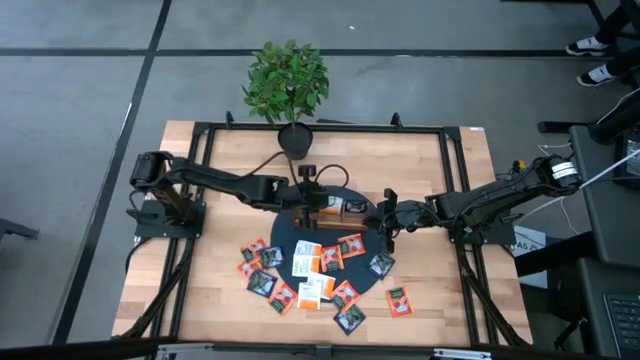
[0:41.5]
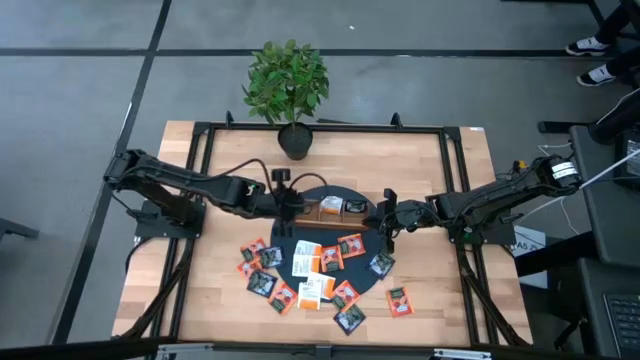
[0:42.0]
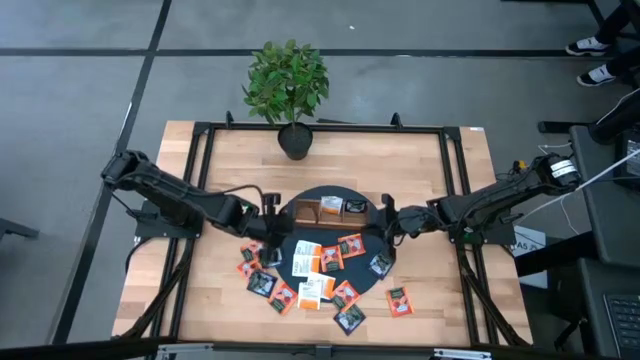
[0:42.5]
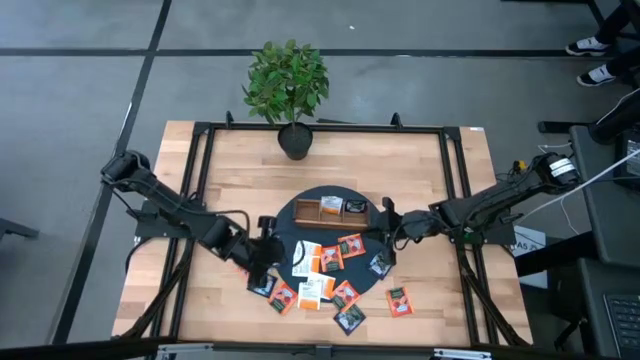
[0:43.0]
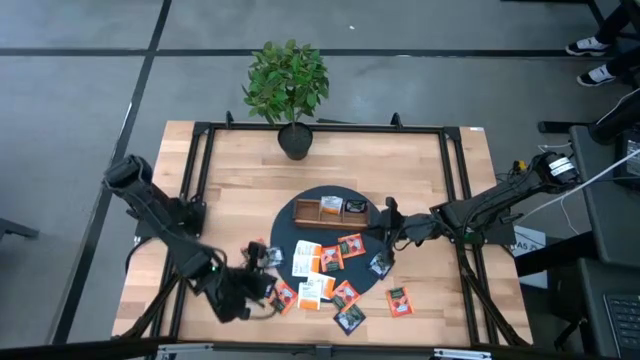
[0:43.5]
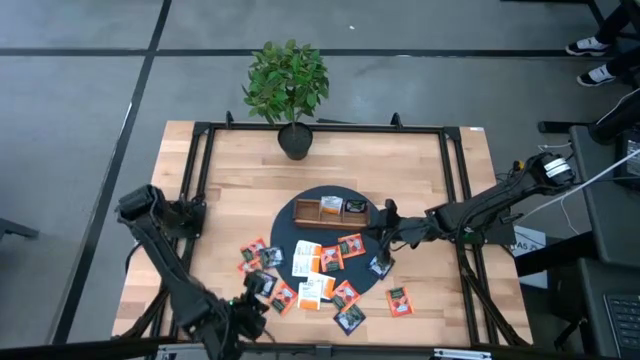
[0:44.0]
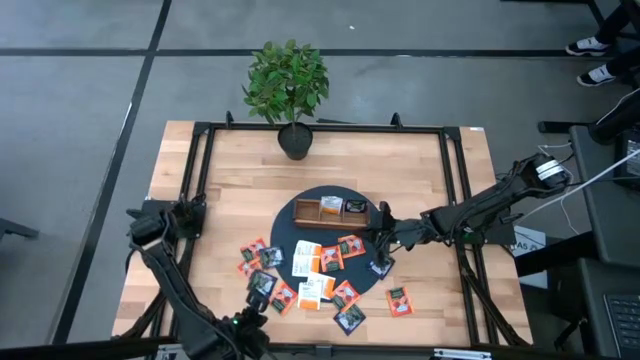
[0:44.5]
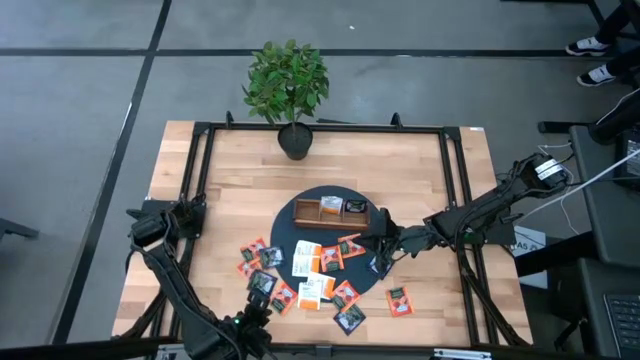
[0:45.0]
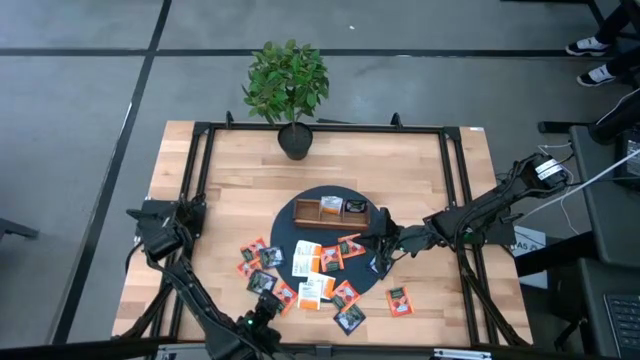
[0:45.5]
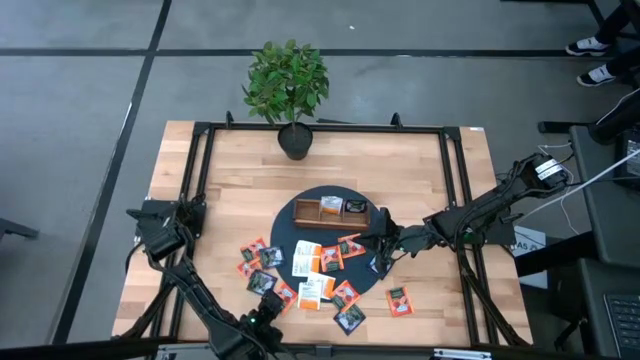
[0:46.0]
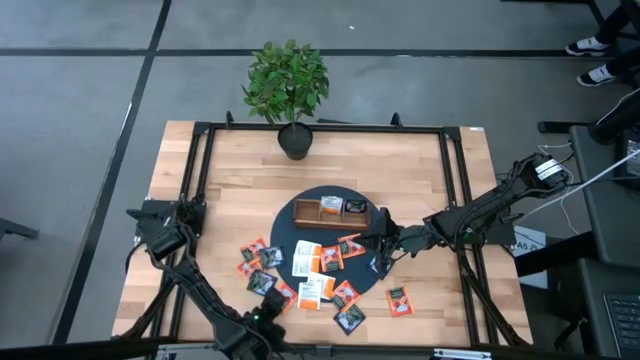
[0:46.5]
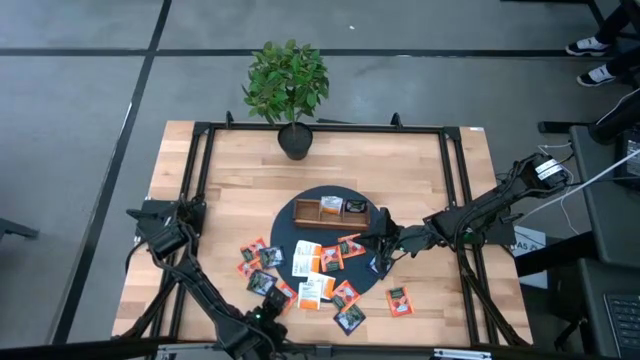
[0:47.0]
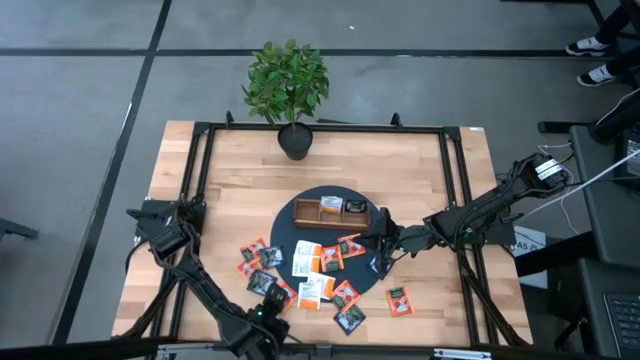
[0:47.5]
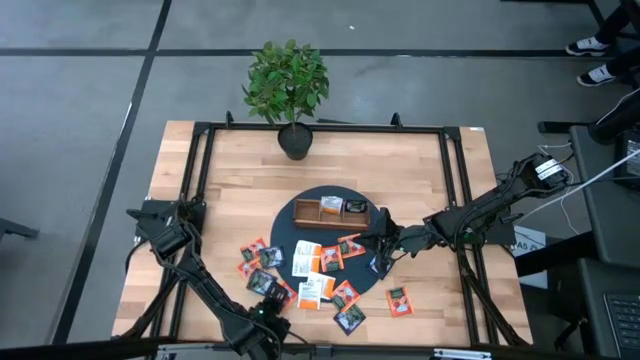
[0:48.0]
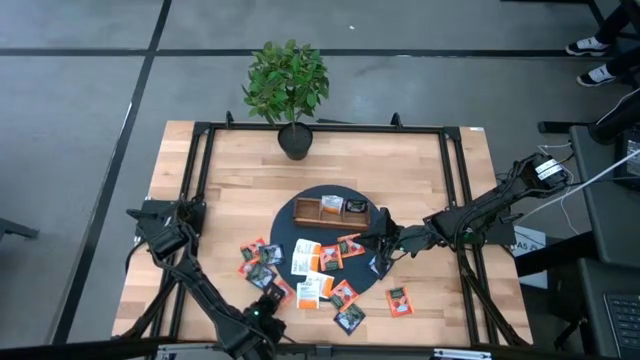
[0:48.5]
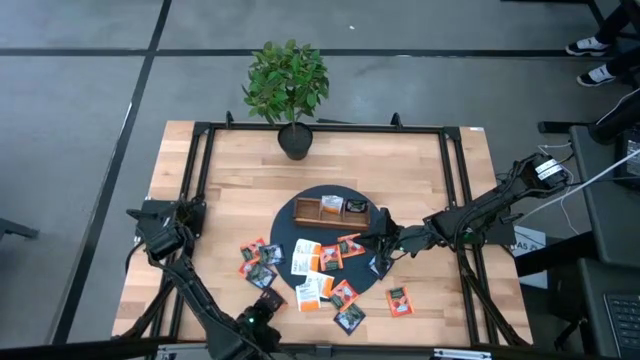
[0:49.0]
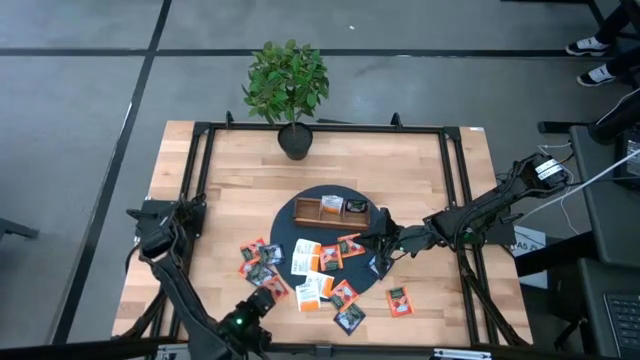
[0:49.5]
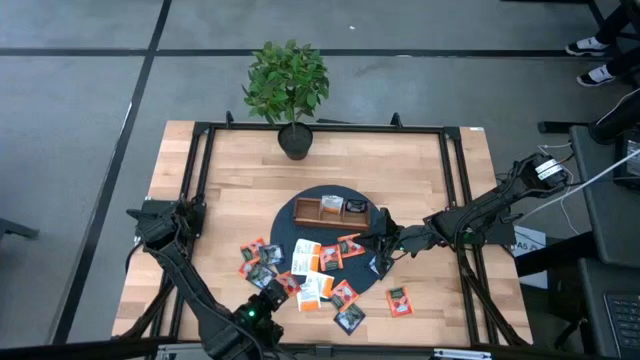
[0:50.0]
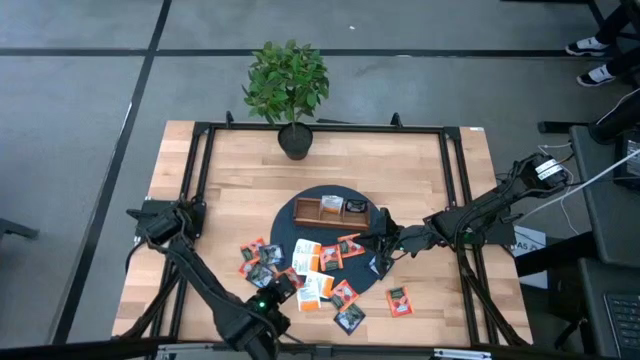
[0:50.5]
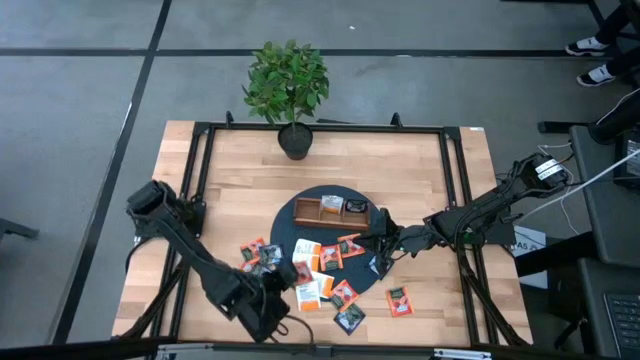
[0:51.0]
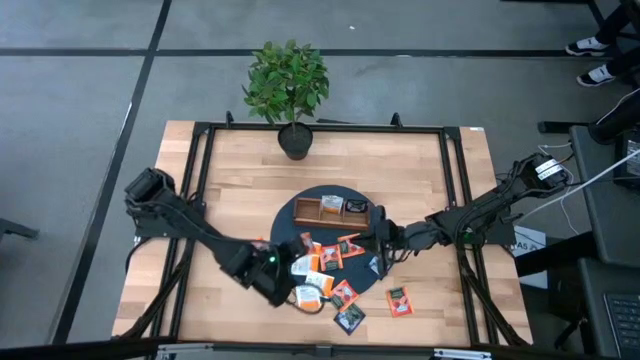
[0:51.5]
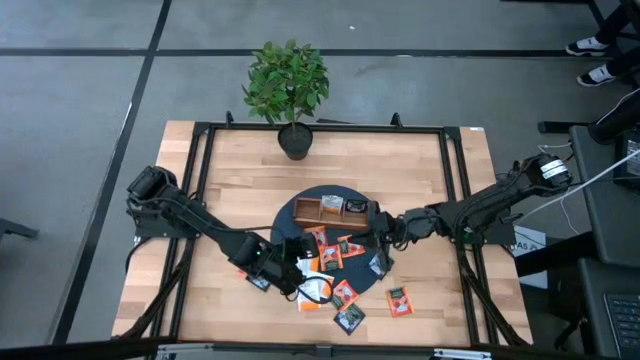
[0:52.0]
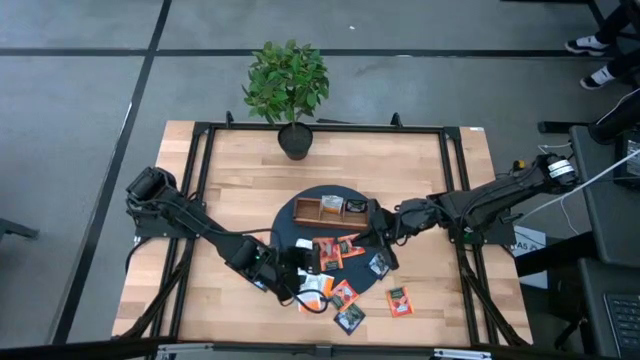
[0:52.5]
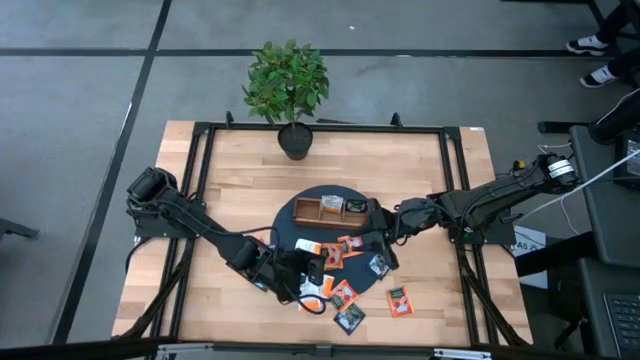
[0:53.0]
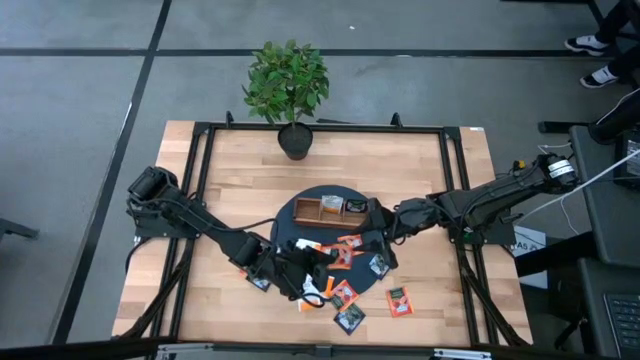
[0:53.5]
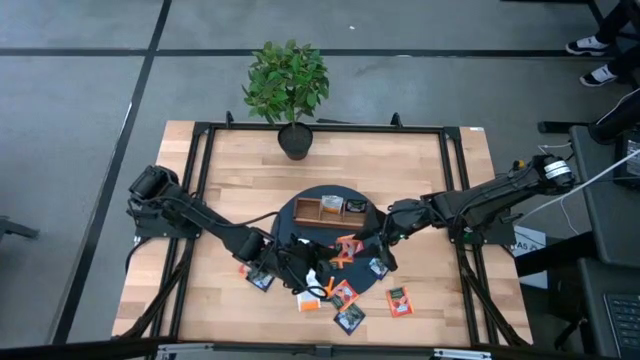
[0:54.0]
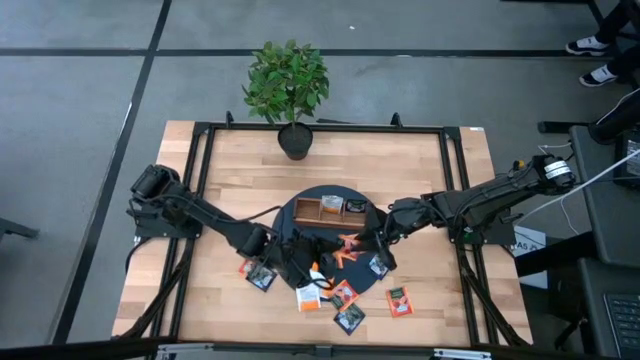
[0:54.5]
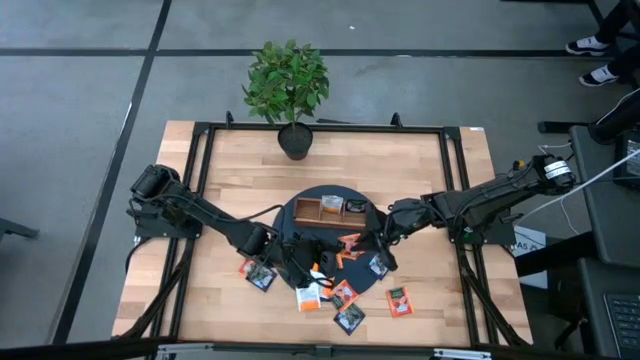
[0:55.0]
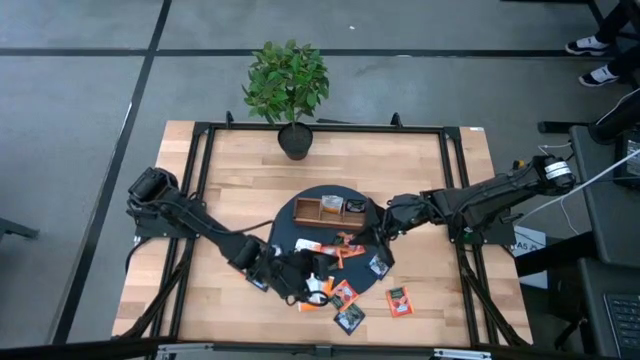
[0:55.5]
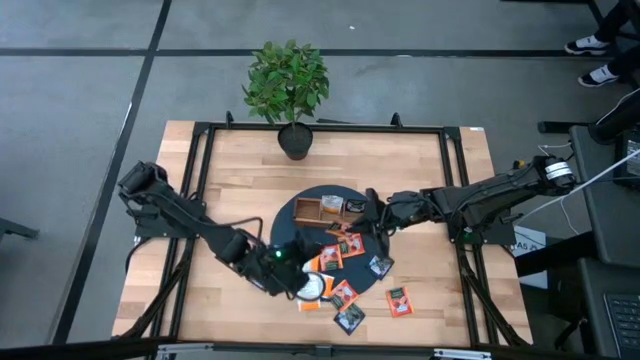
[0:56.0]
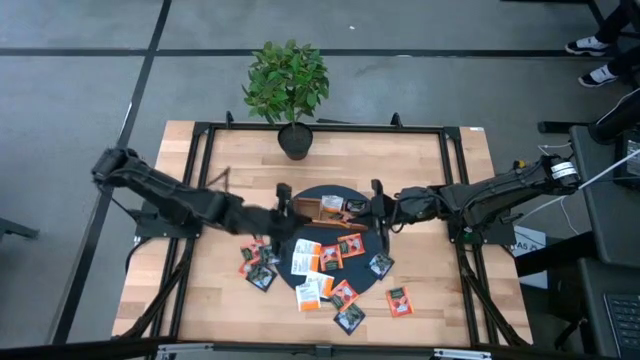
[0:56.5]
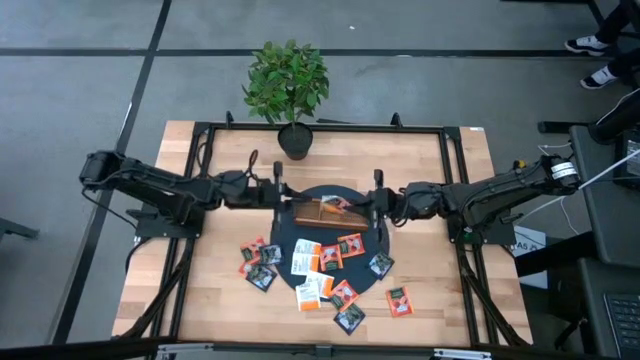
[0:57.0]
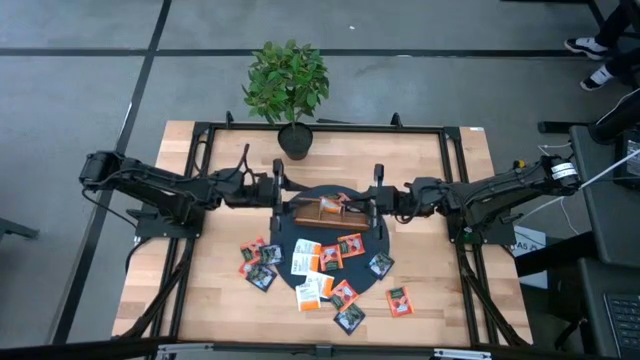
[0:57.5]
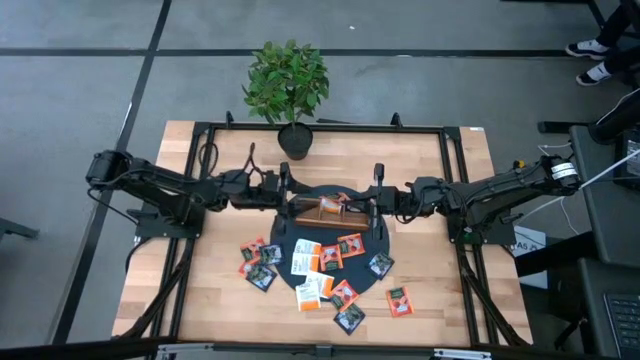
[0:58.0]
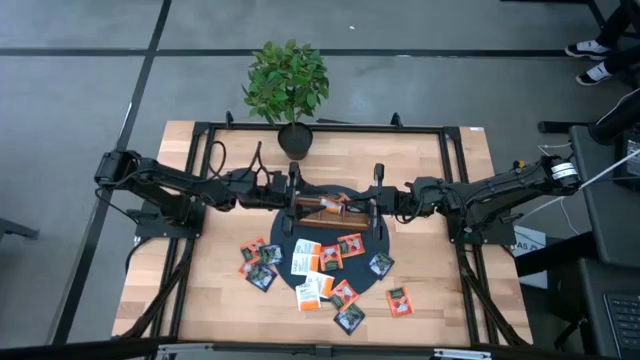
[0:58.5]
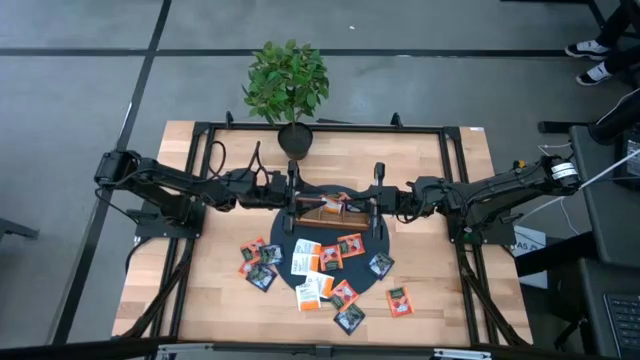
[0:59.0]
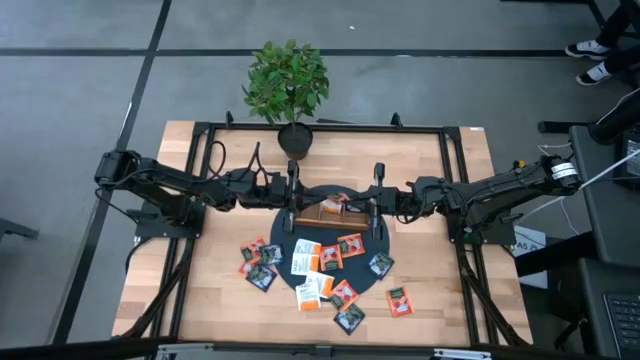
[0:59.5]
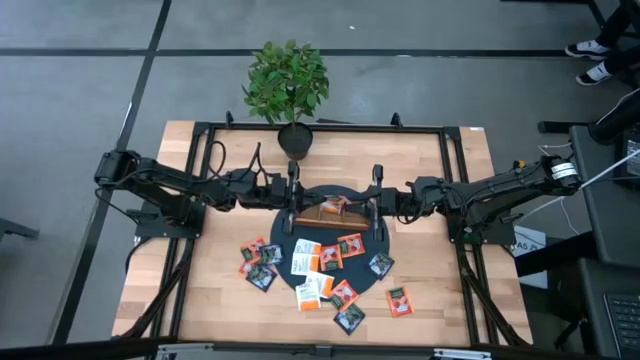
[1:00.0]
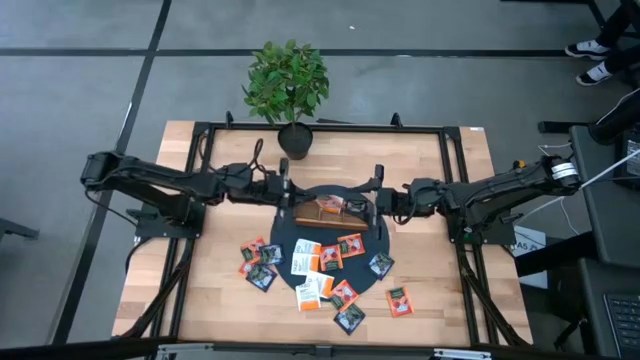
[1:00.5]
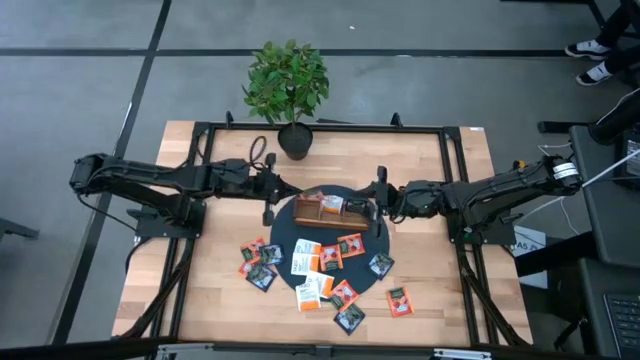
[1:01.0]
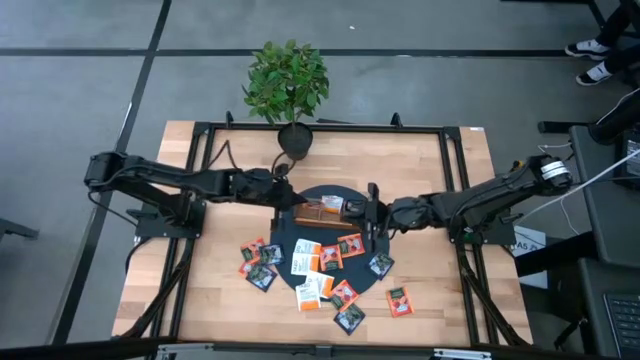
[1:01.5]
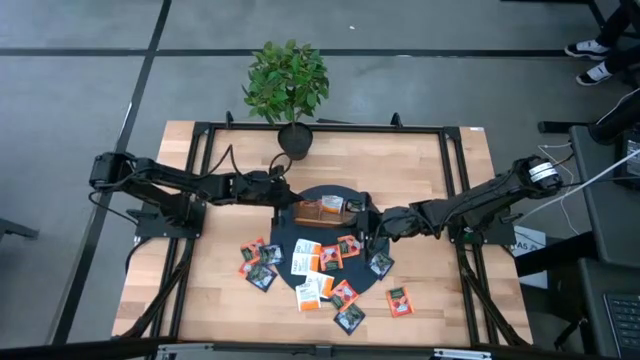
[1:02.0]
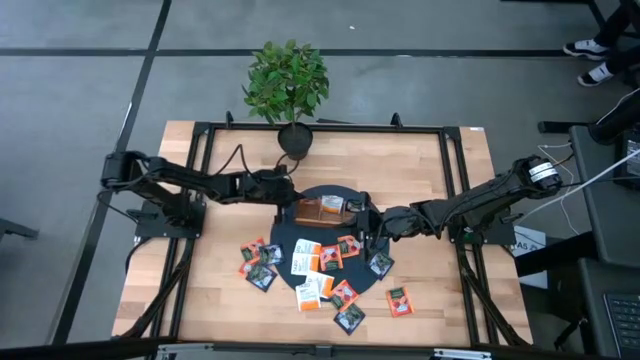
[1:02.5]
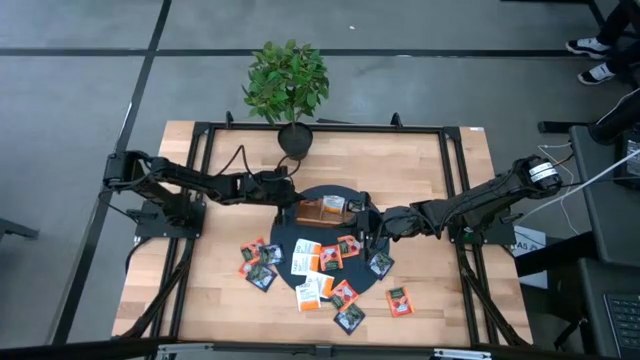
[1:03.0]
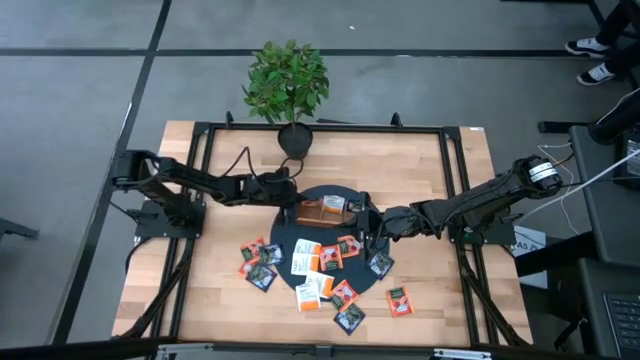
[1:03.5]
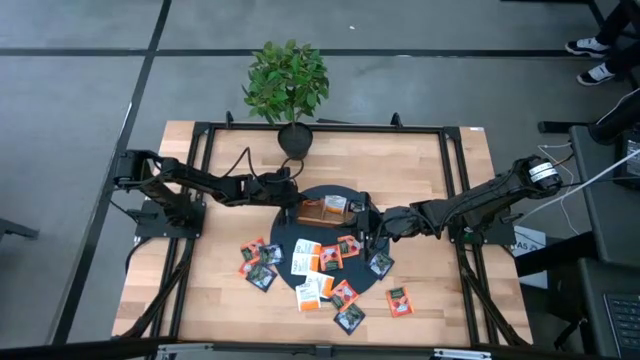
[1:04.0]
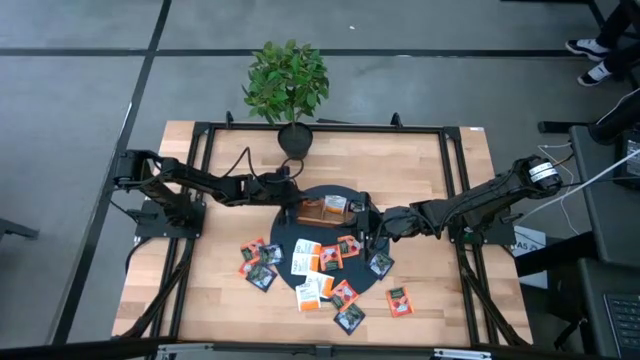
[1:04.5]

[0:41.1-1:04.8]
Task: Pick & Place Tea
Put the orange tea bag into the left side of the wooden organizer
